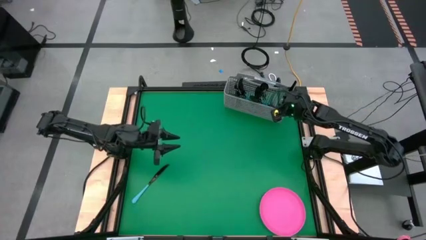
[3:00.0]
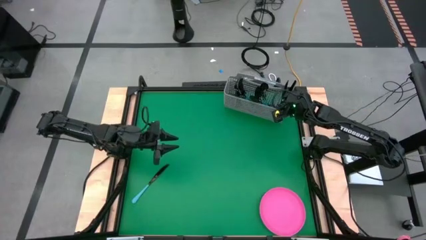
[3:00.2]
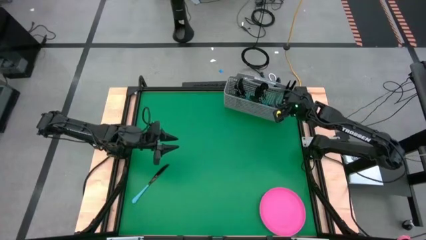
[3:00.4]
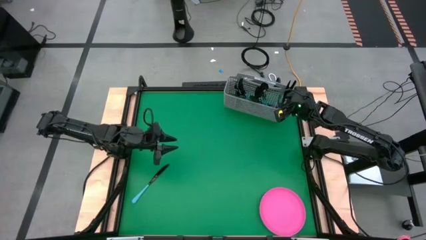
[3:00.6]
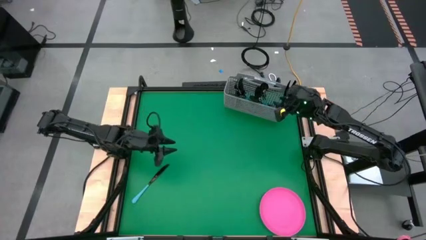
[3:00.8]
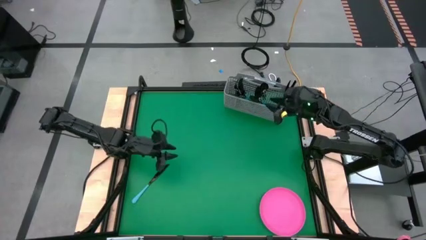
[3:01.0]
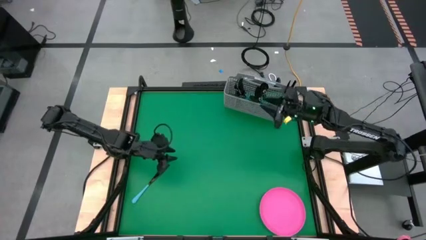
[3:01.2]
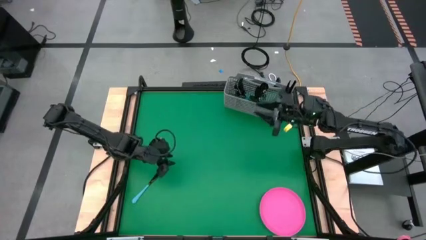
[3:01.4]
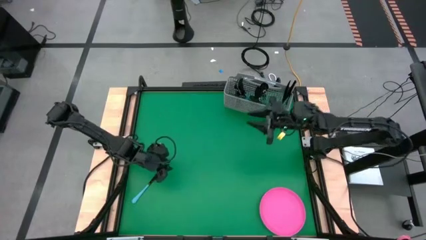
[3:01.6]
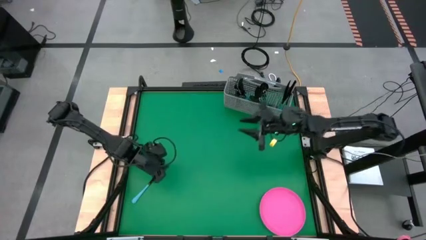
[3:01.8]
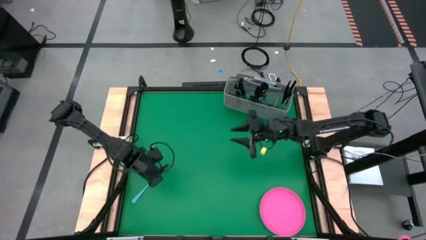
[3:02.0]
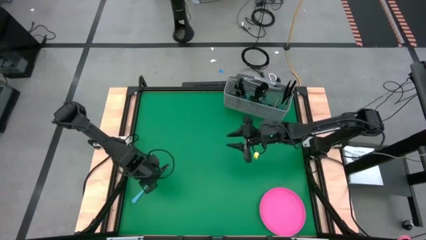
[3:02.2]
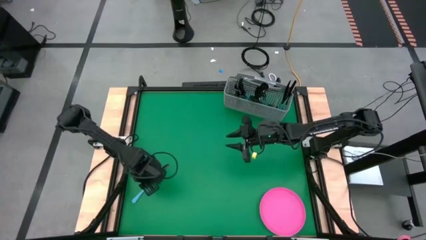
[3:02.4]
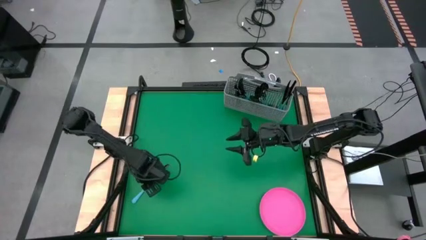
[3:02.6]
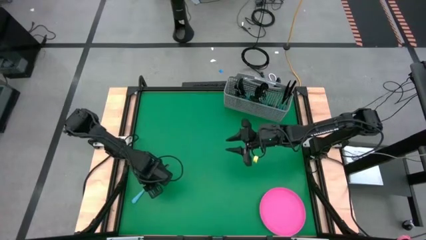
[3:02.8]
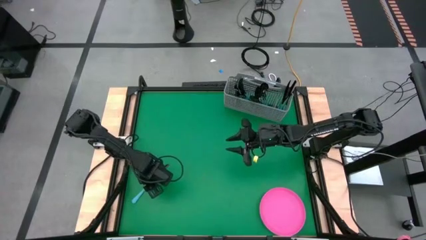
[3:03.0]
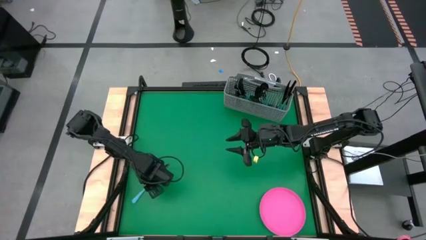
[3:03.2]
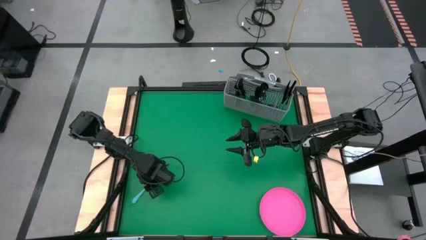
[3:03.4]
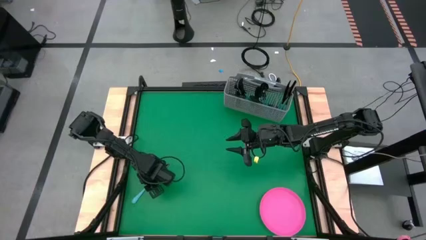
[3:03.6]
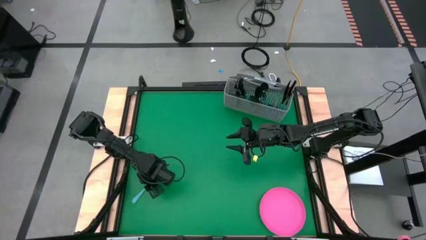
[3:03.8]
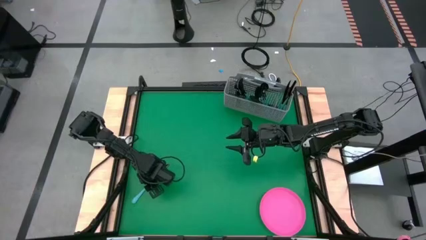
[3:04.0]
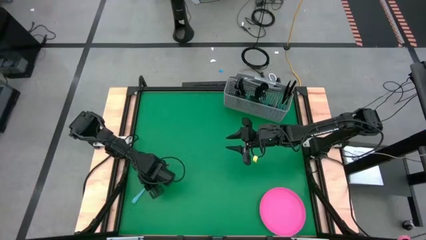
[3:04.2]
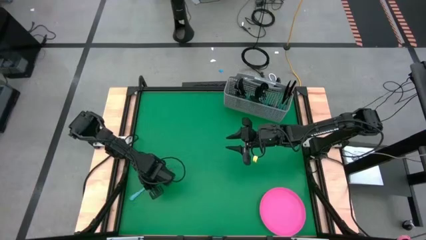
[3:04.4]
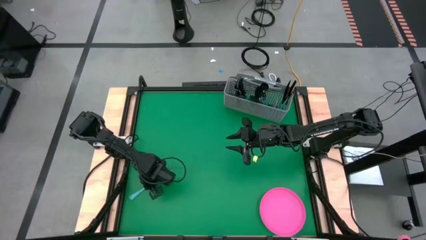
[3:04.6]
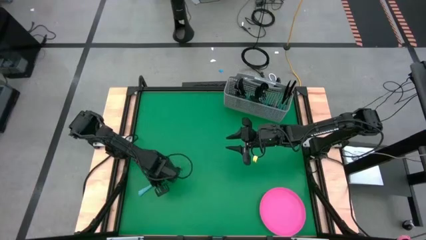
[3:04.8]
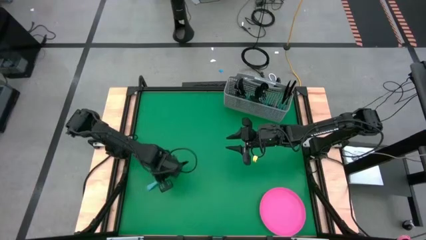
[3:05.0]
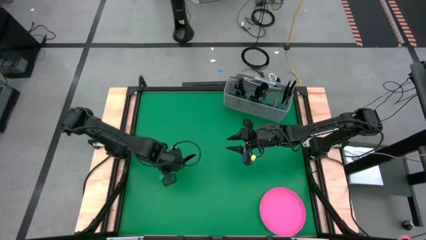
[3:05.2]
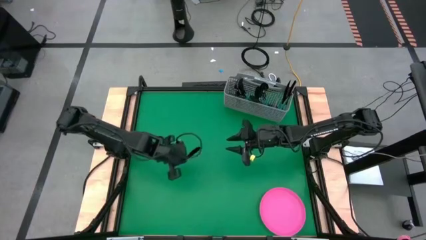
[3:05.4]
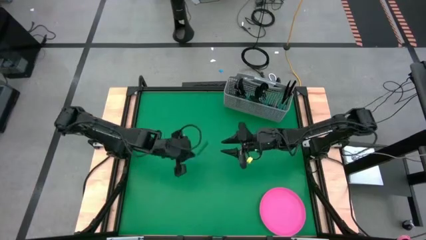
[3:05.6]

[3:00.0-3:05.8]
Task: Sort silverware
Put the blue table knife into the silverware basket

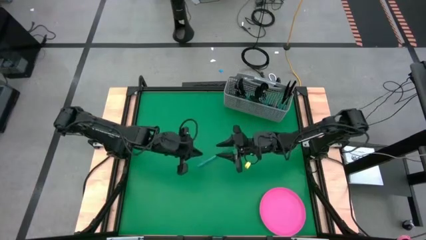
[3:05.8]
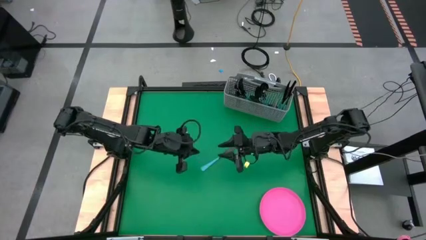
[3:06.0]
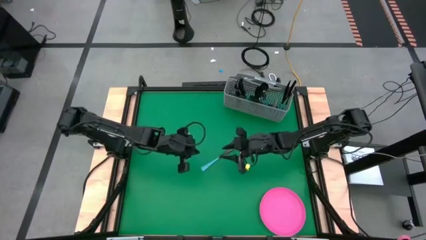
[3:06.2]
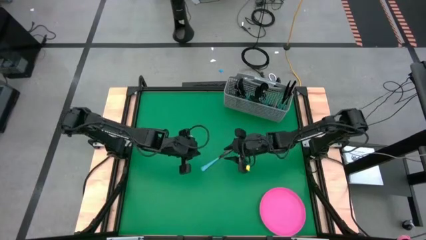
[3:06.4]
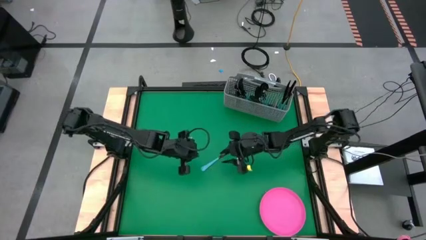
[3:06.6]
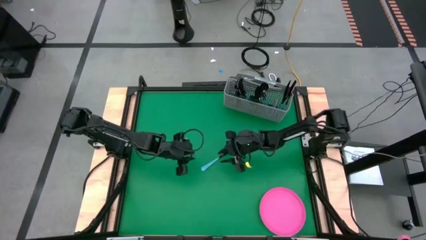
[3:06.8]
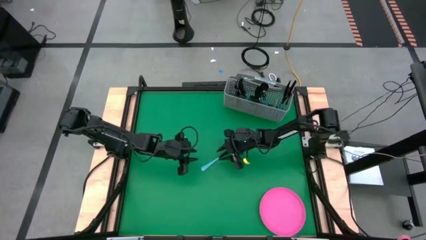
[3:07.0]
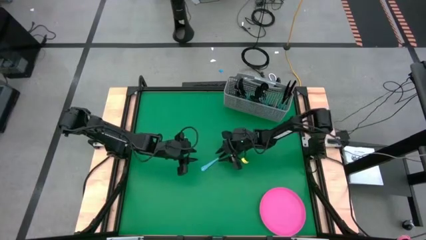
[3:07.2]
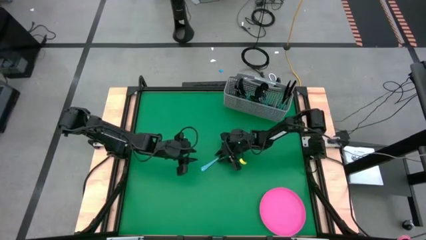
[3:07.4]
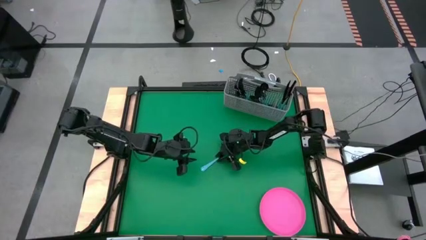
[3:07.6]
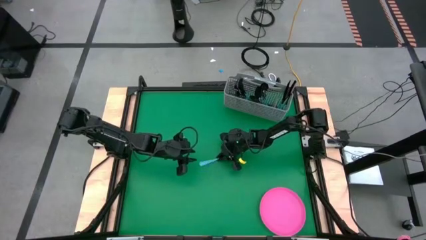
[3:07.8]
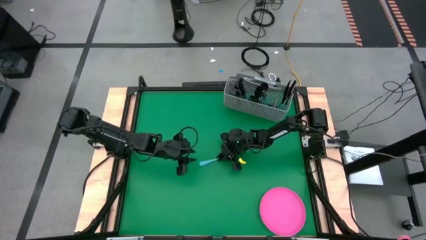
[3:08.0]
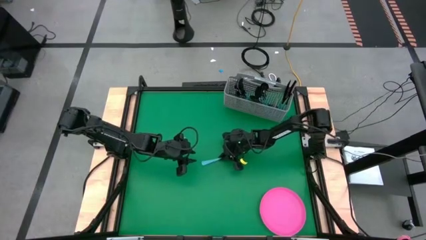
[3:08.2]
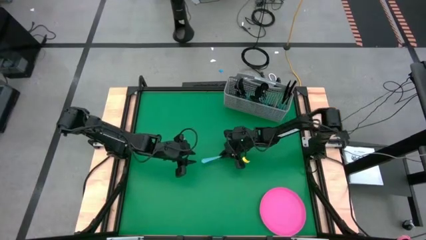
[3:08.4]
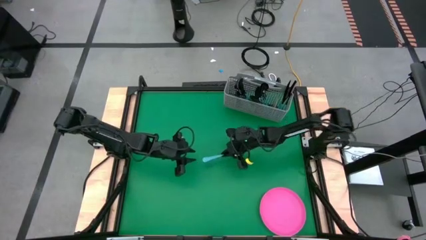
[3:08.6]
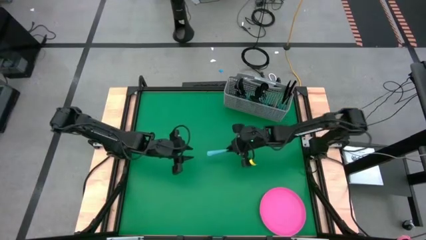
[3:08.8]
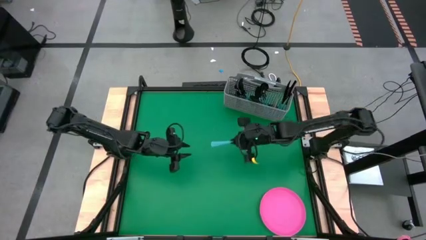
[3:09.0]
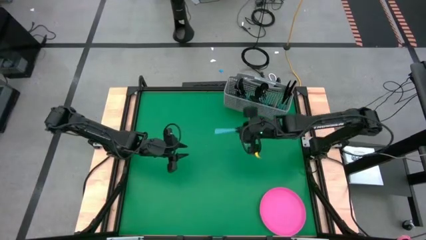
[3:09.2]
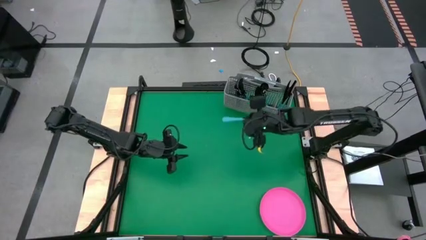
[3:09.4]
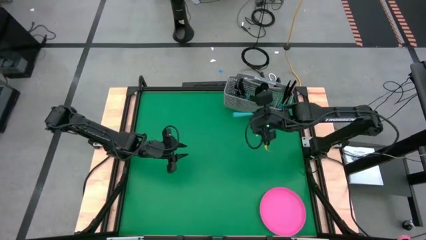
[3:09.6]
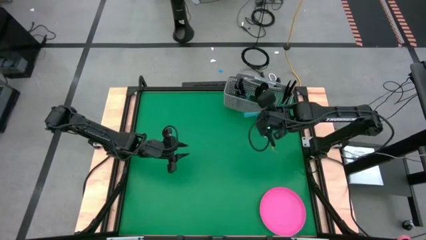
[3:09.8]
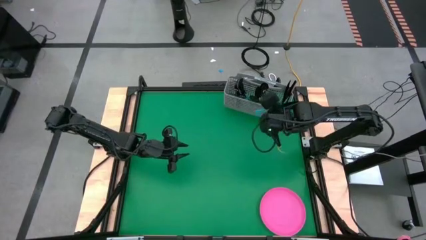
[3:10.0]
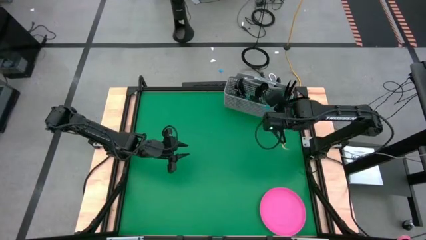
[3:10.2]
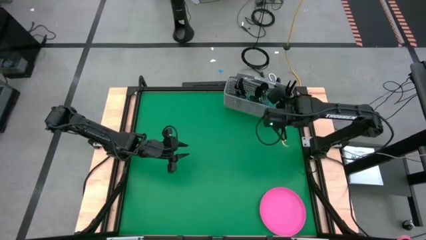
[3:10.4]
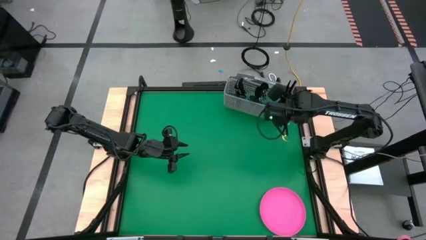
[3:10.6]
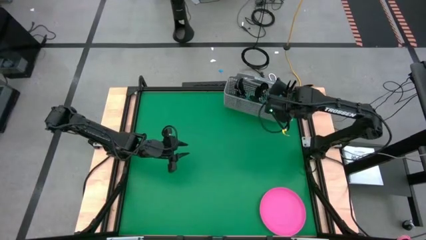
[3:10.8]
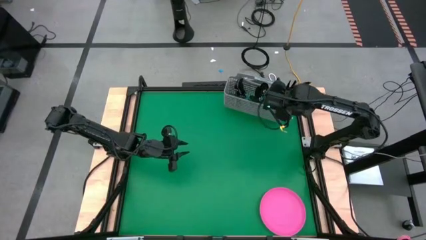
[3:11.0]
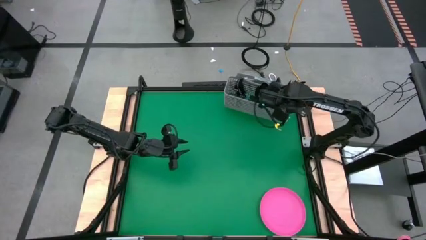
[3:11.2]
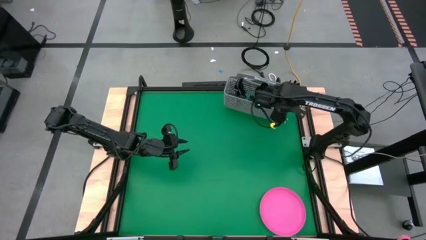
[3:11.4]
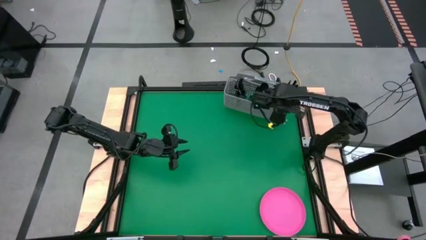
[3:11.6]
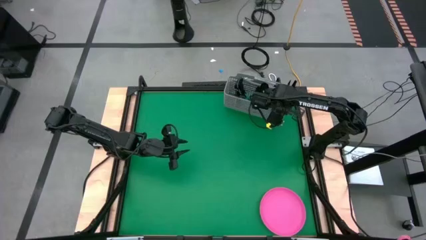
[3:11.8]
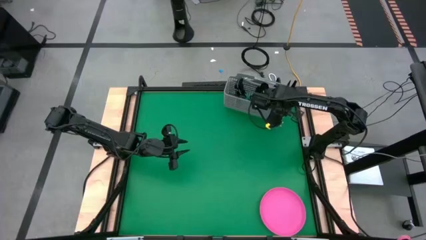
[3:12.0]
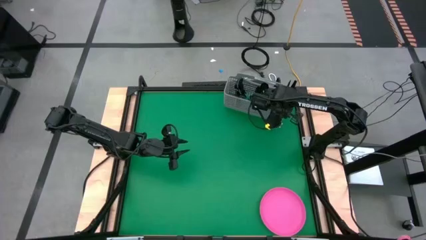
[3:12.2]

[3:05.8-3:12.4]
Put the blue table knife into the silverware basket

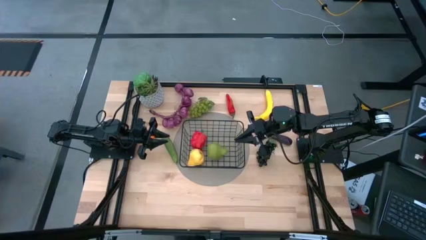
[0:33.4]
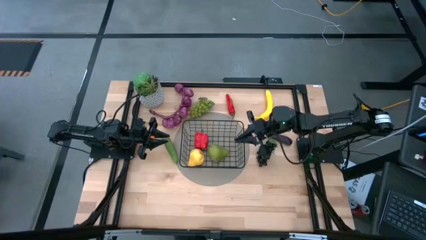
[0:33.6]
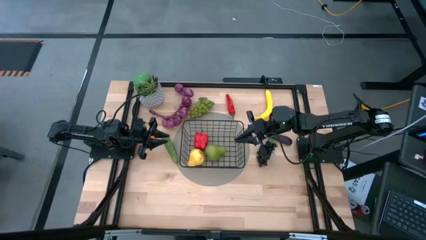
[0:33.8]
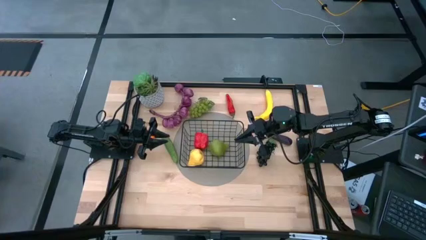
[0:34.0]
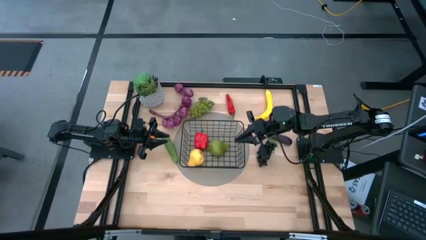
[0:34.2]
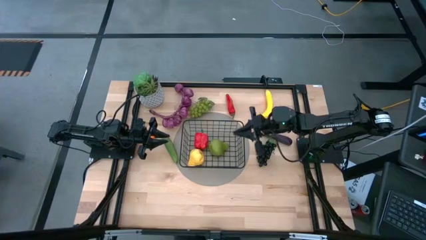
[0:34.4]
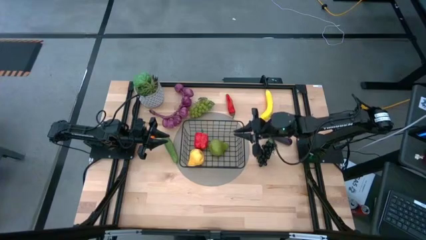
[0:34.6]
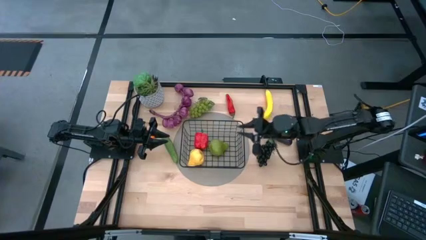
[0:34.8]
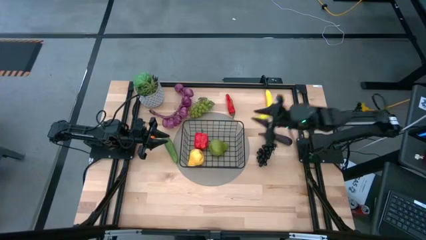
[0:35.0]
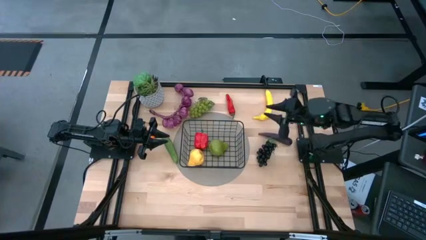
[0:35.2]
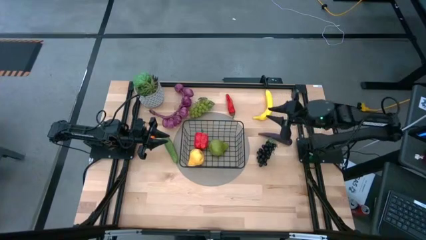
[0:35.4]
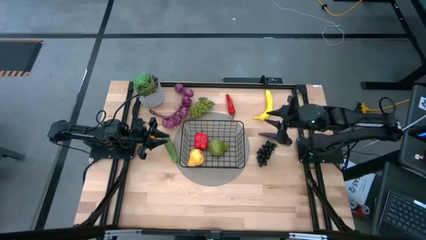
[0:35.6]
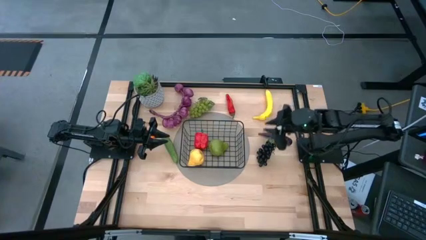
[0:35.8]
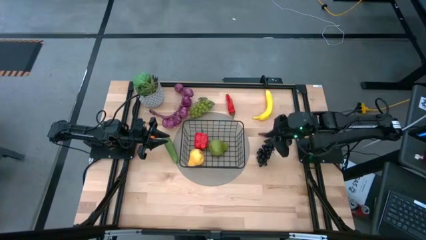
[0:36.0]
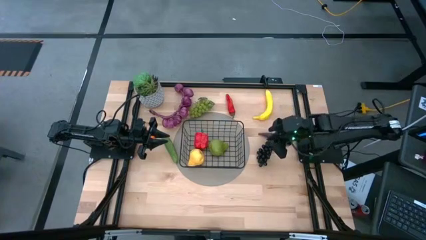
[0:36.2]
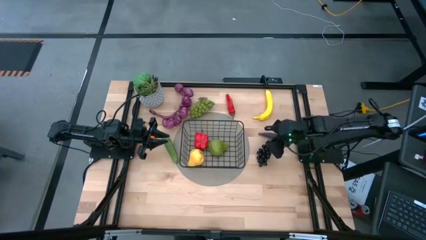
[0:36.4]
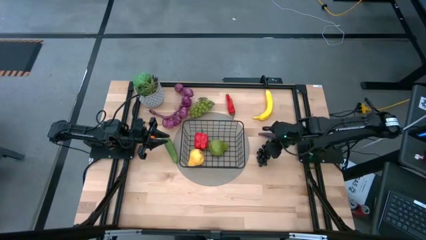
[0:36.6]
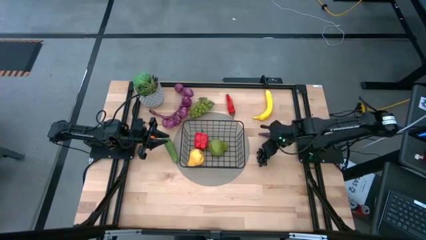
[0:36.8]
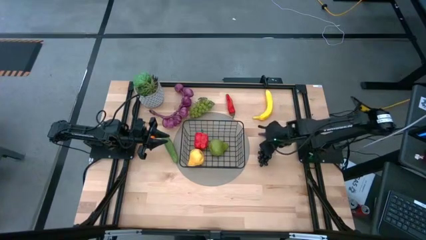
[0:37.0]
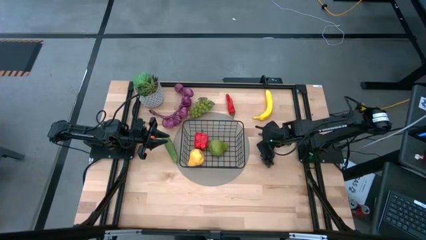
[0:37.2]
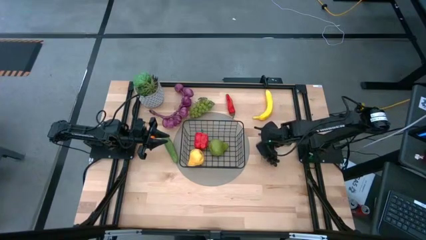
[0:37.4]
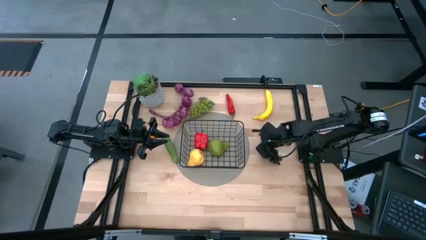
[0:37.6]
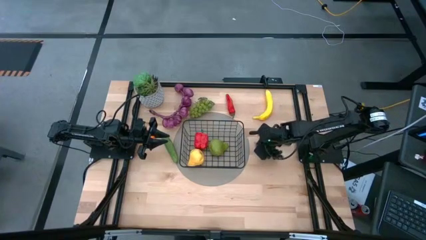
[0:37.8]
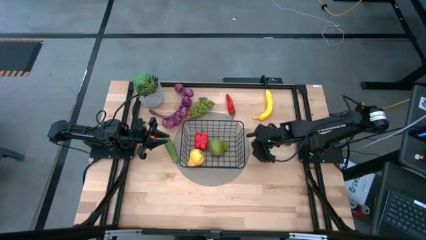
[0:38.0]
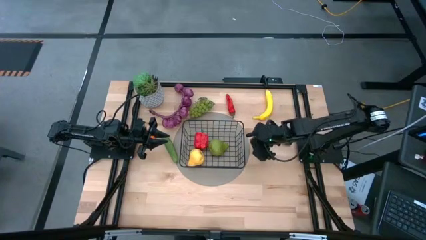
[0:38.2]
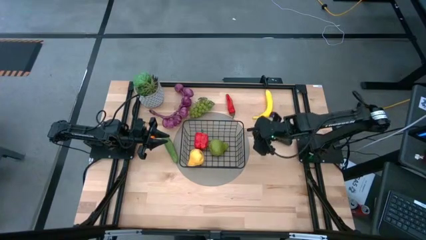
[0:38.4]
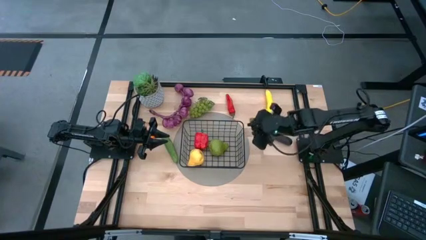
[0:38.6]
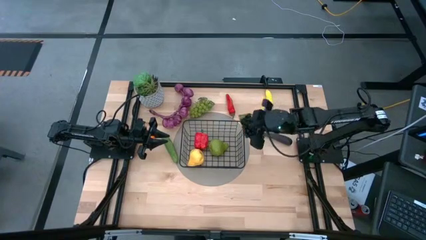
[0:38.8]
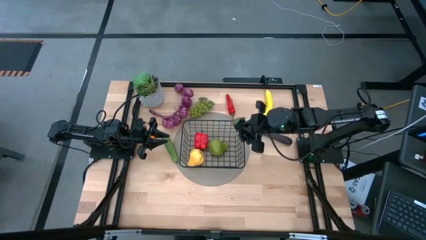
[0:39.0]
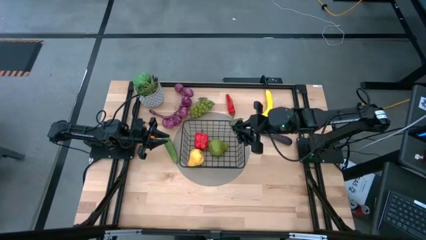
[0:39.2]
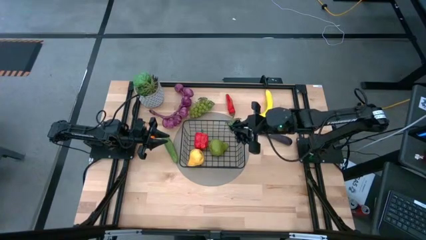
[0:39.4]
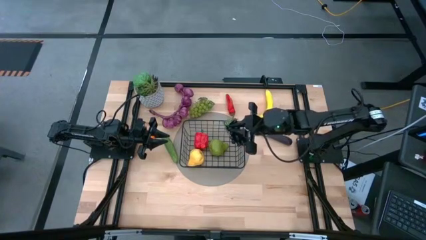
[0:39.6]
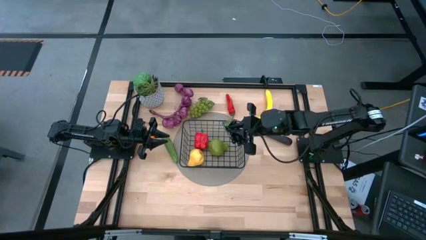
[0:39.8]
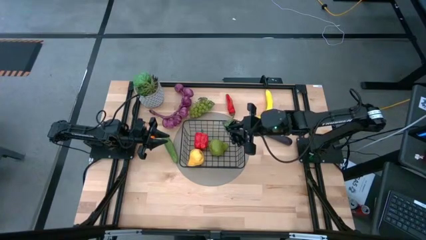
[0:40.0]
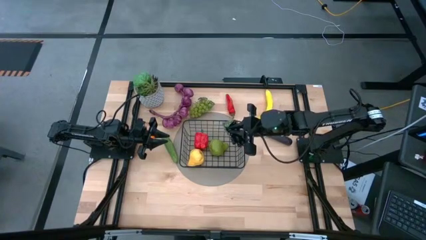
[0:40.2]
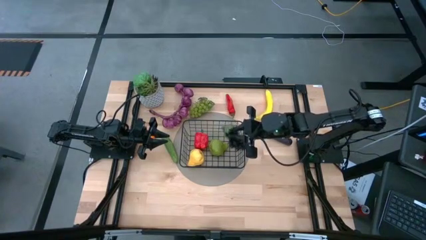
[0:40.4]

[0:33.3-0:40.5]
Task: Build produce basket
Put the black grapes into the black wire basket
